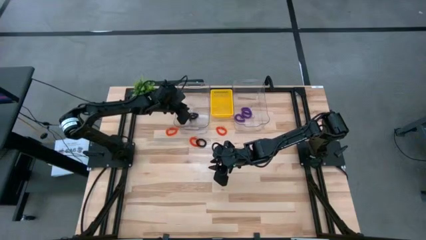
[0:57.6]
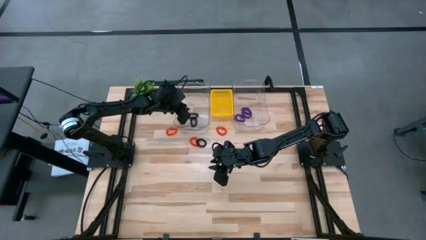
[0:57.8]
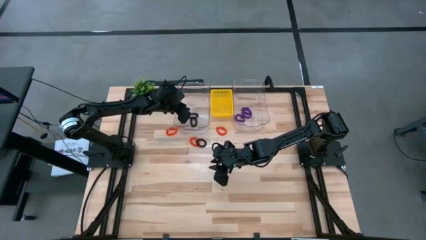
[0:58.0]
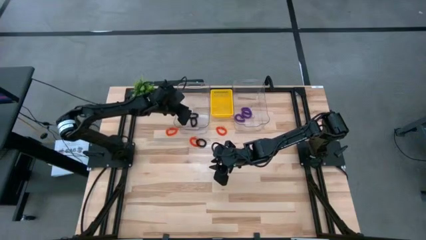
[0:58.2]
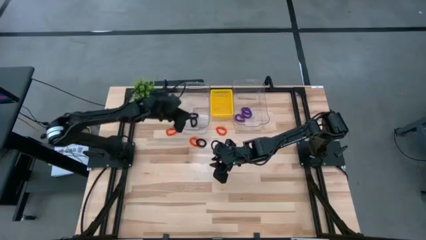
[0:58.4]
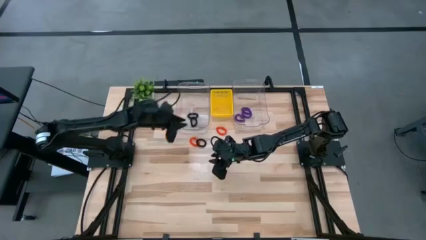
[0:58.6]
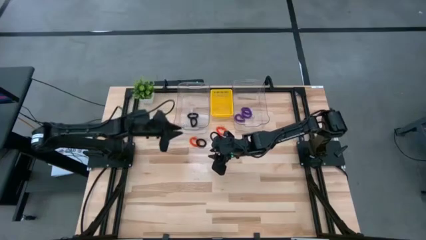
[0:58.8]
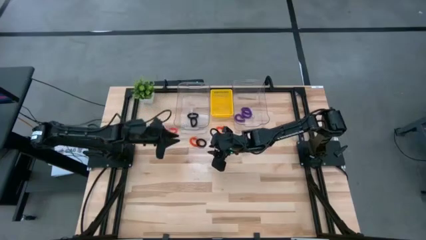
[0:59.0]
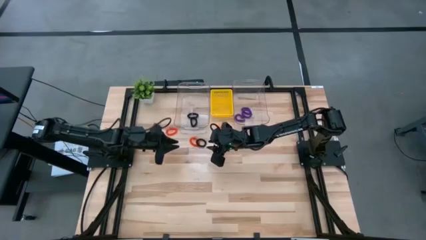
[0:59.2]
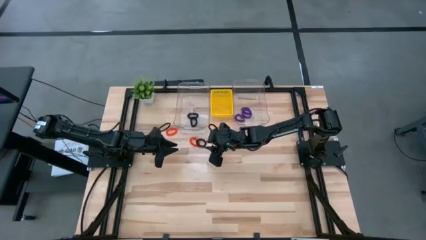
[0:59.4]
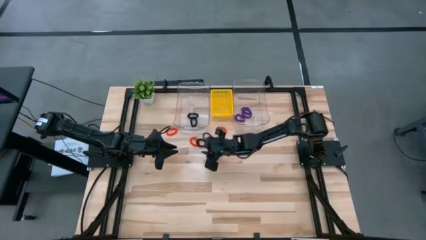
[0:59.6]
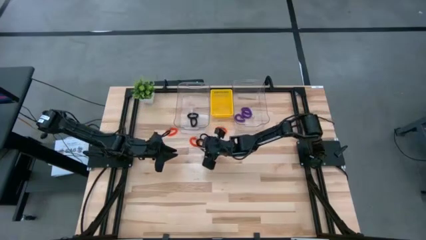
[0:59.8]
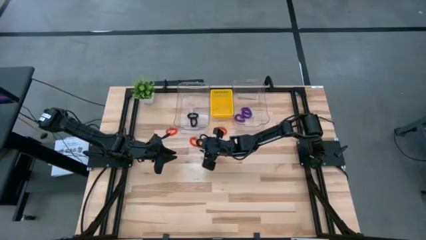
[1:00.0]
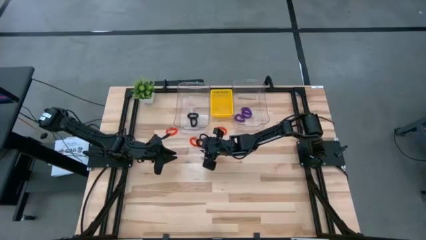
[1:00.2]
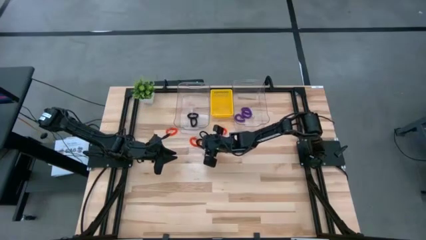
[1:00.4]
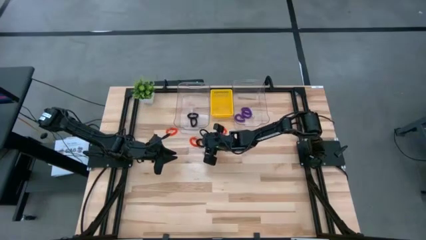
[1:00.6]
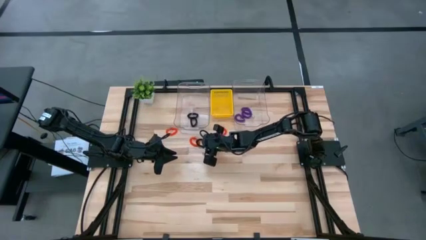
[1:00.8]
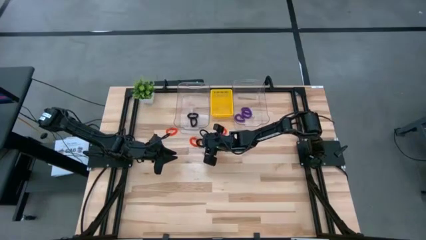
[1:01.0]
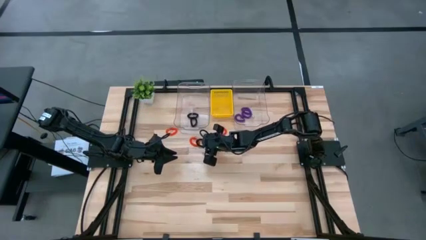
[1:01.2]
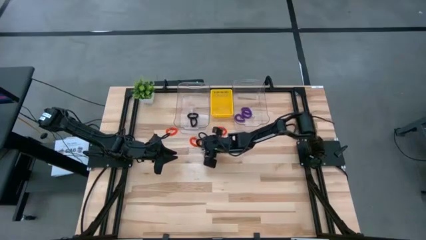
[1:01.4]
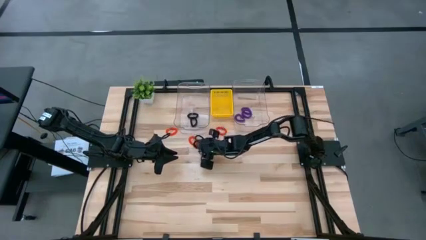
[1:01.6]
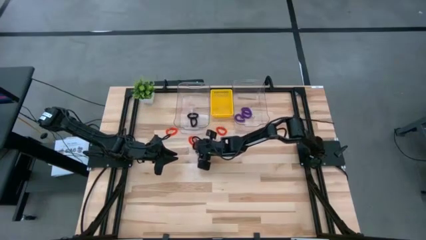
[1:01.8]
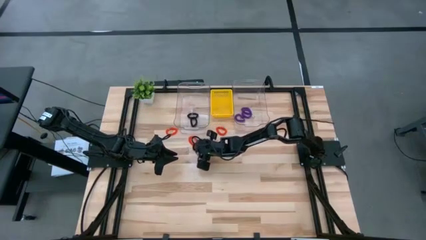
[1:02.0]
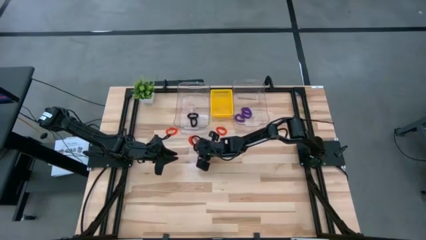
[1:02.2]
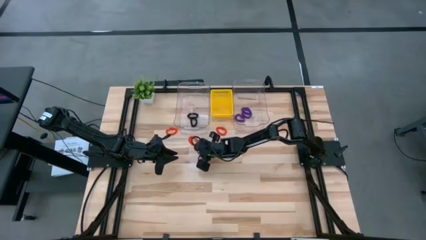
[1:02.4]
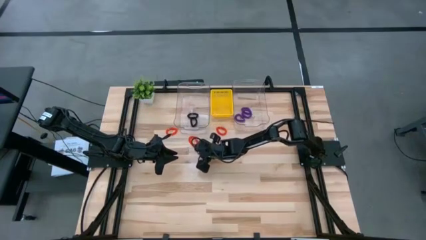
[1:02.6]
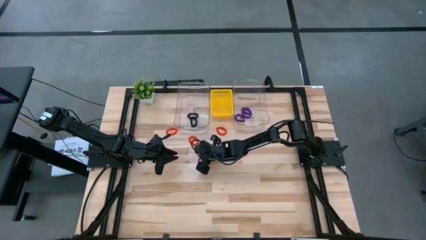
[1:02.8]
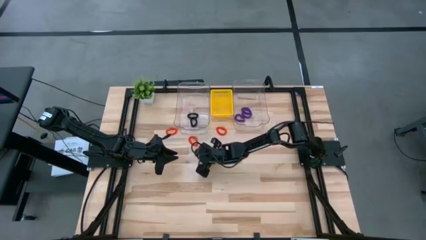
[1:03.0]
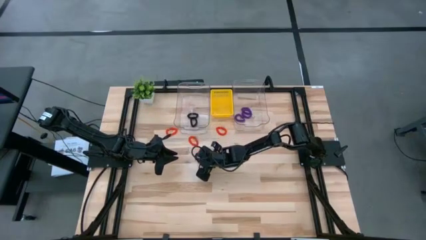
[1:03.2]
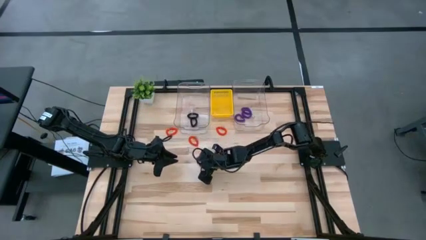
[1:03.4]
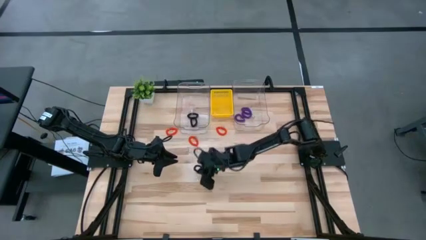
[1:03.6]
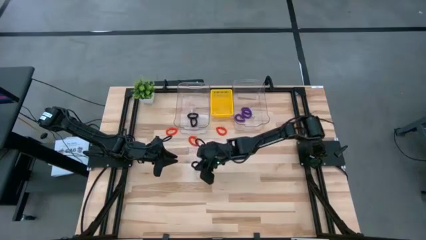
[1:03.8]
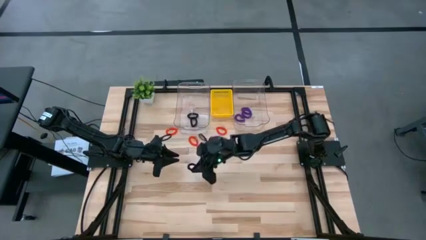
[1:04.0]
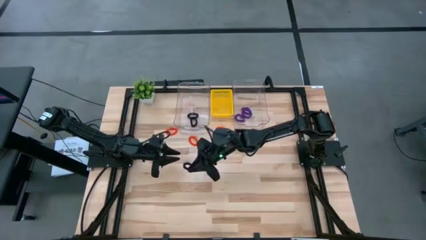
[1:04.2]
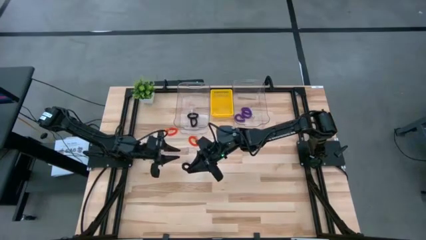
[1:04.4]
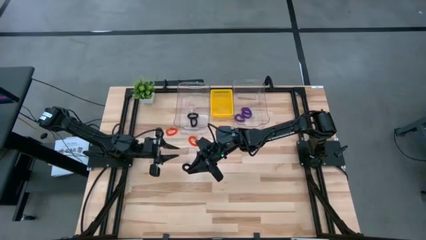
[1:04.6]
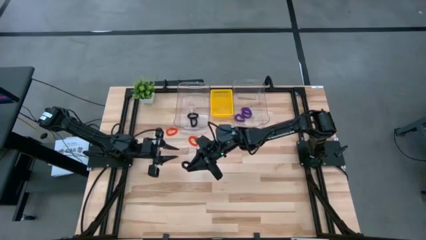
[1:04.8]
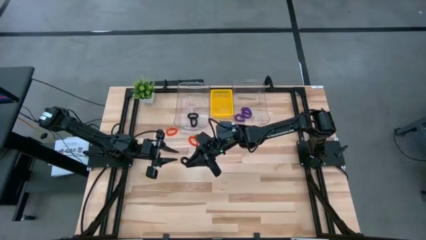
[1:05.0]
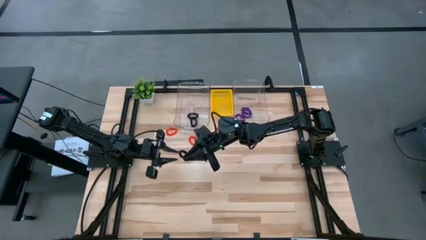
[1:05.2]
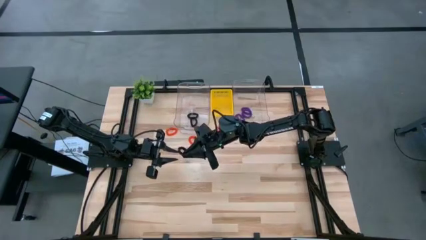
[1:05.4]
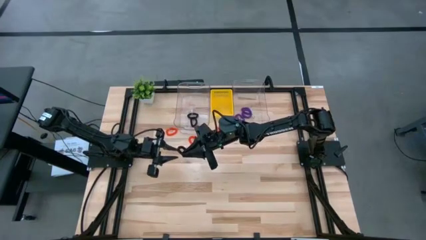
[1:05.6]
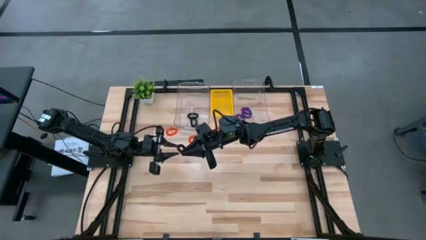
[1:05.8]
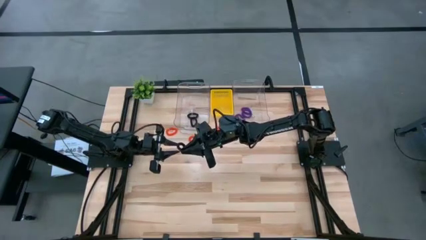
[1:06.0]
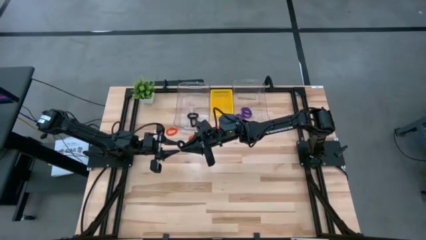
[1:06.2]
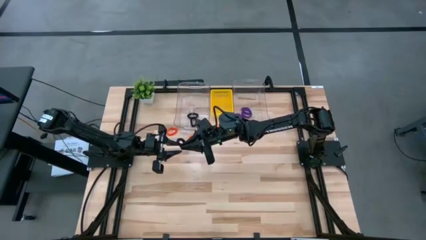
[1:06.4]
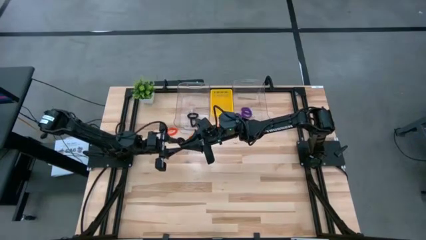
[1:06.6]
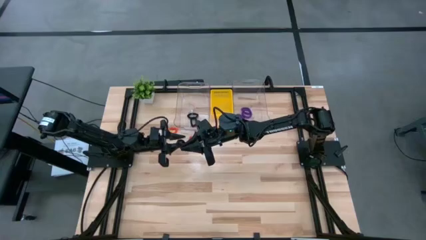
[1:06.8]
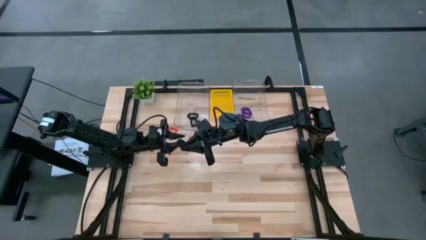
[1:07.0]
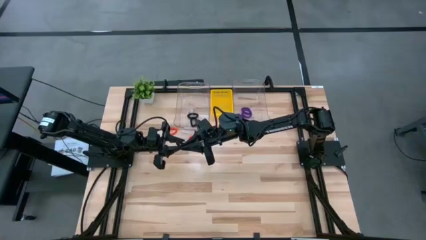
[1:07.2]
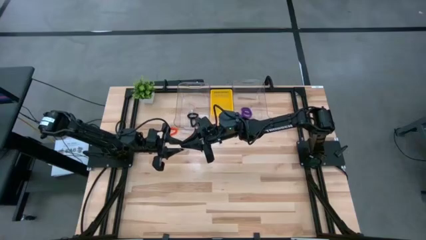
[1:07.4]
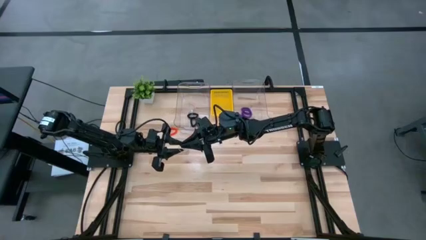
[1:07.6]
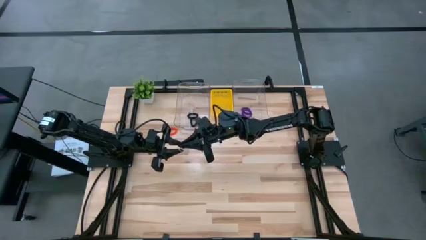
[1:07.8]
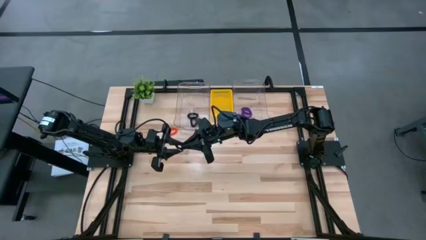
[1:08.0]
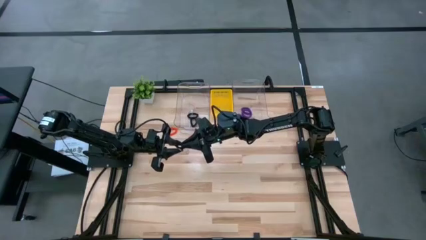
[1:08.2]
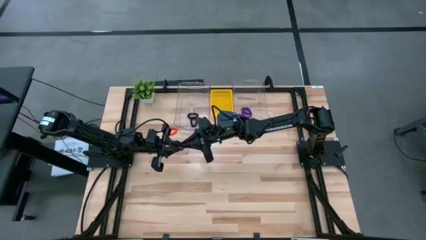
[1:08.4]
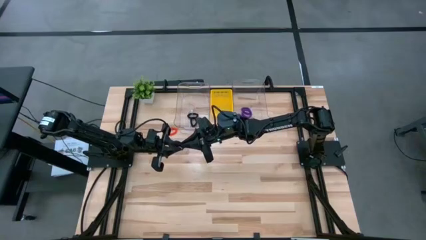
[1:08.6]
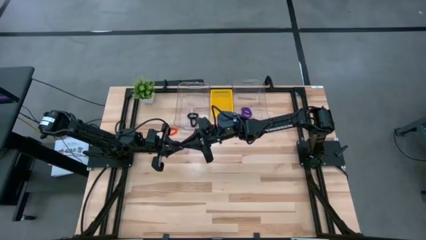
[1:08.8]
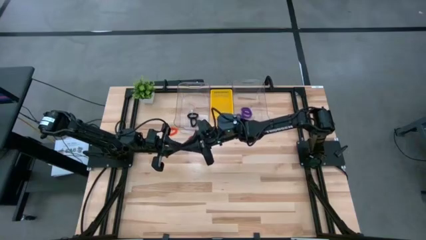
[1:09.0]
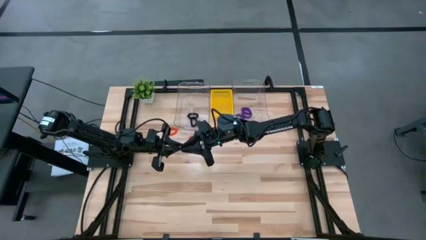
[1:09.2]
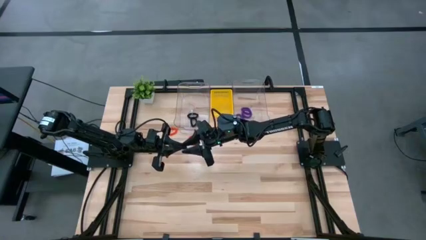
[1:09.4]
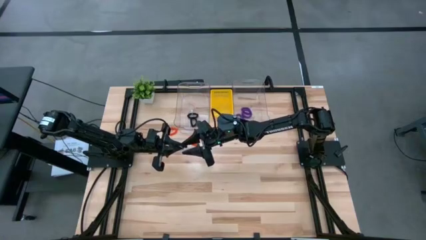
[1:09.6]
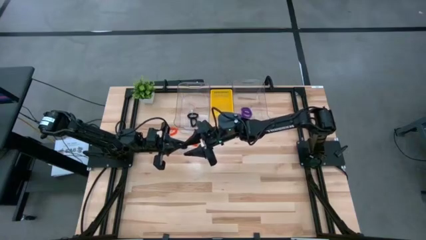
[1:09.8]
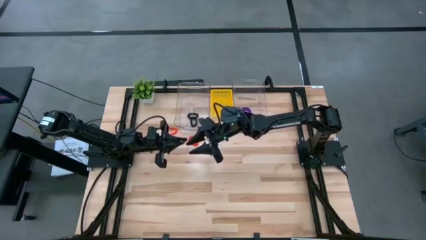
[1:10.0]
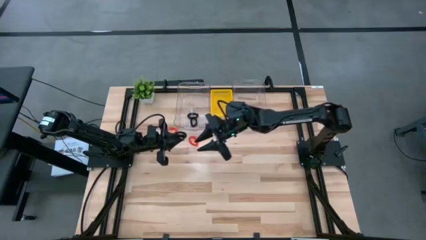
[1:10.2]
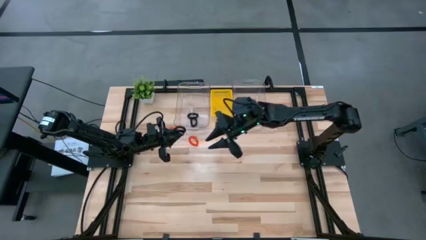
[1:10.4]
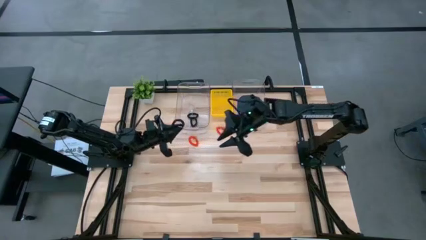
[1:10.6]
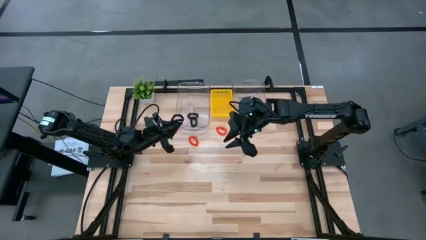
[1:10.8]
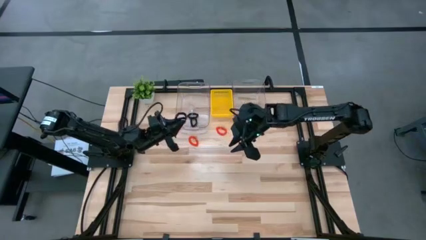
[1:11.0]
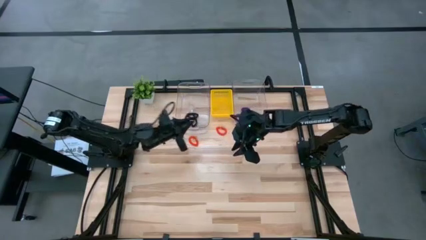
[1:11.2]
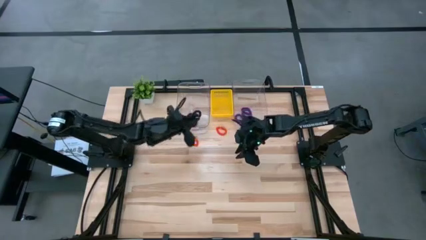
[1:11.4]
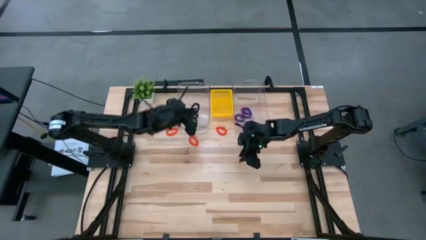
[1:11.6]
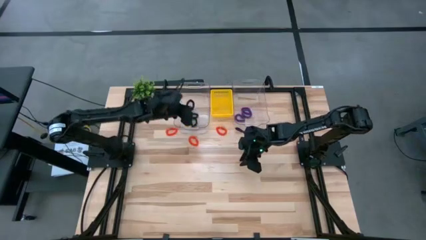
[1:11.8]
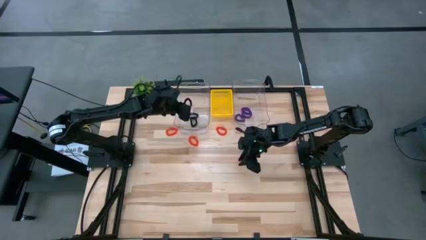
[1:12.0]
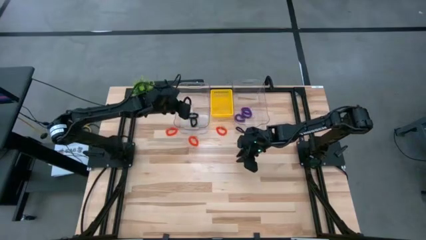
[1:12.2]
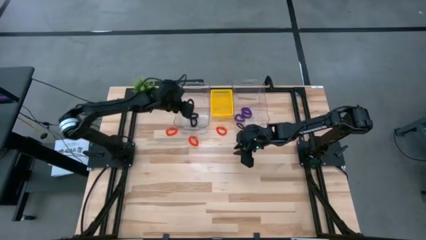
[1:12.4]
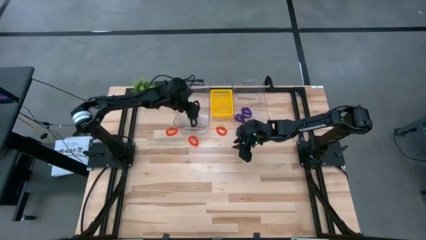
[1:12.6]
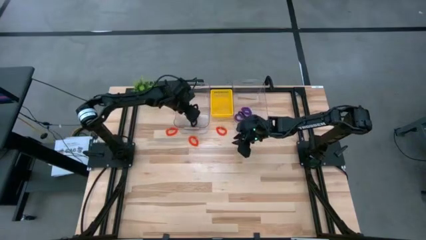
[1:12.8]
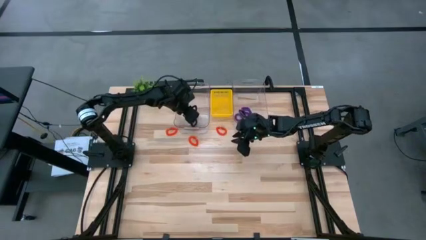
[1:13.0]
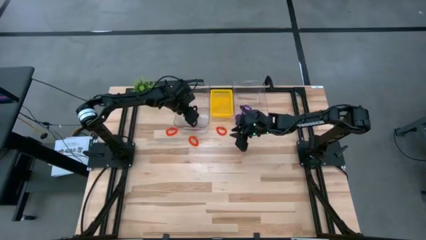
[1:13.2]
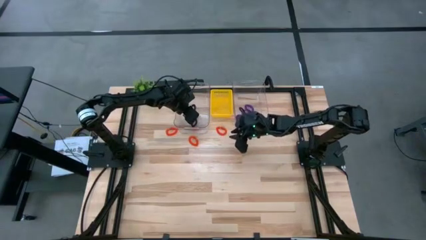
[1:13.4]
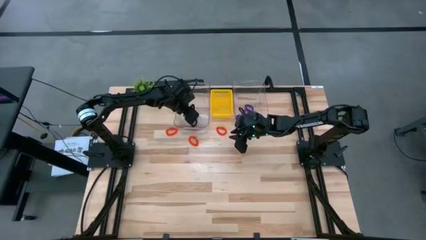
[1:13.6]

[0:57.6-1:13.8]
Task: Sort spring keychains
Put the black spring keychain into the left transparent bin
